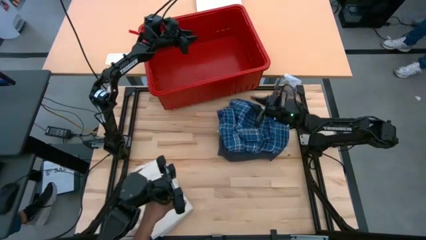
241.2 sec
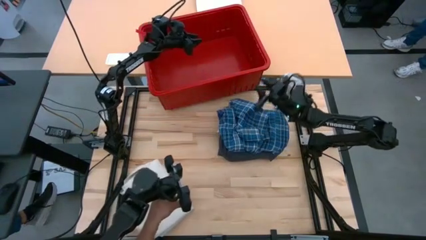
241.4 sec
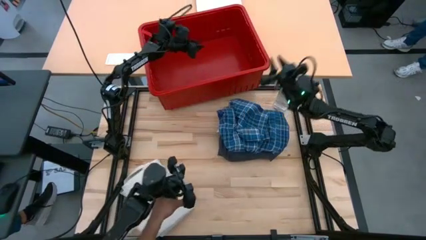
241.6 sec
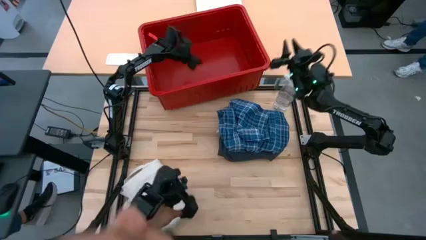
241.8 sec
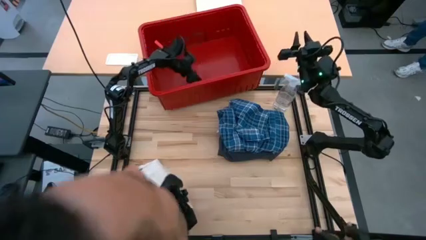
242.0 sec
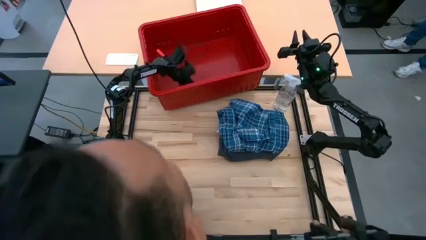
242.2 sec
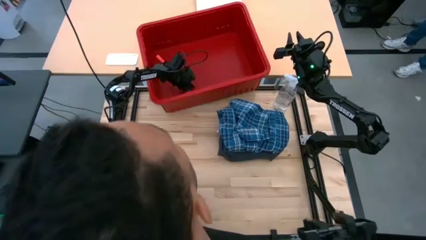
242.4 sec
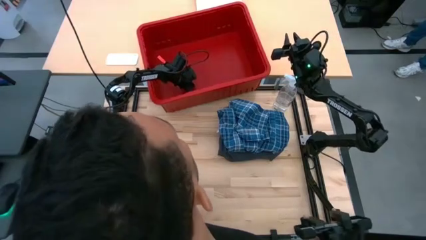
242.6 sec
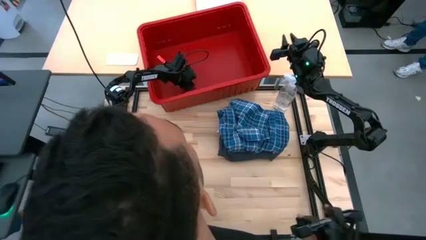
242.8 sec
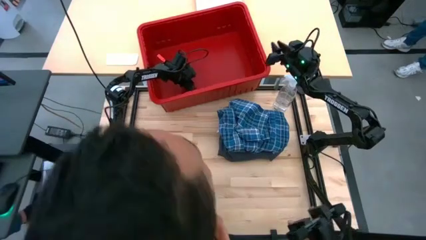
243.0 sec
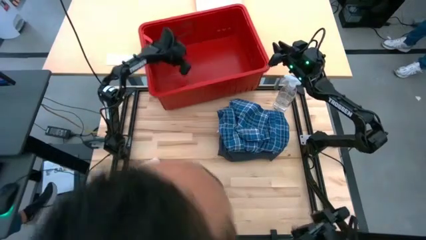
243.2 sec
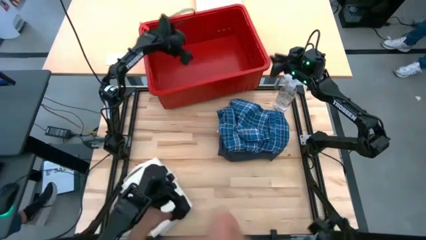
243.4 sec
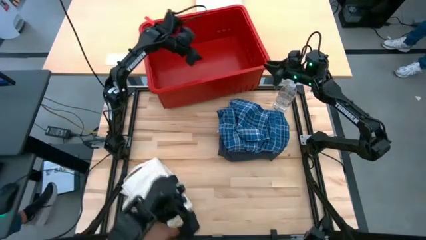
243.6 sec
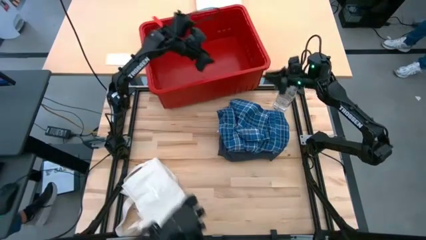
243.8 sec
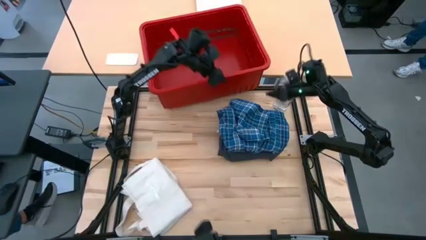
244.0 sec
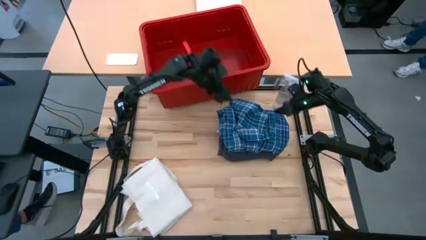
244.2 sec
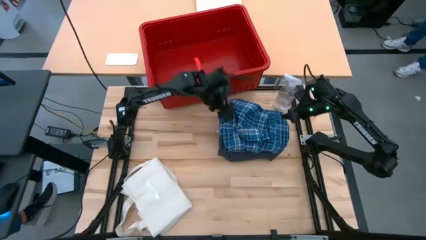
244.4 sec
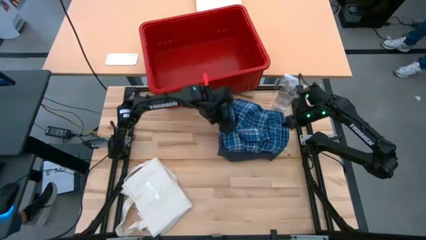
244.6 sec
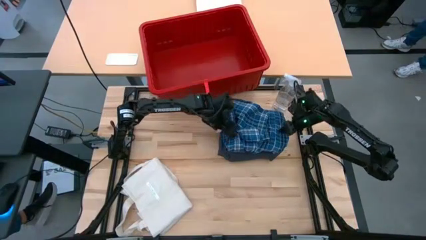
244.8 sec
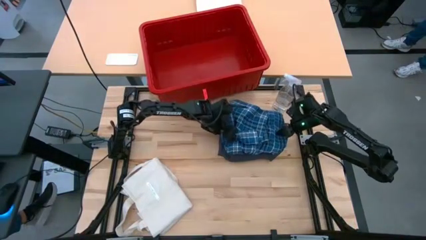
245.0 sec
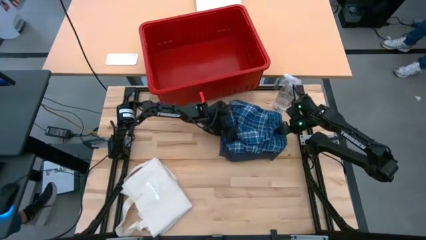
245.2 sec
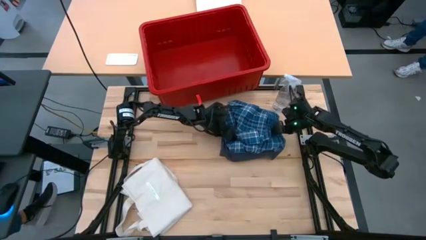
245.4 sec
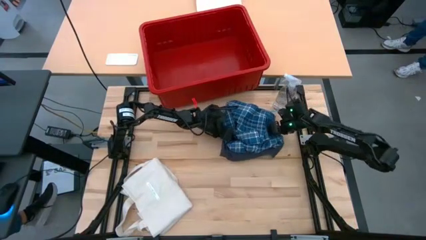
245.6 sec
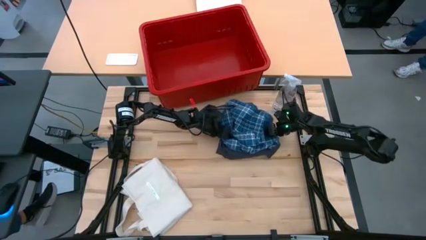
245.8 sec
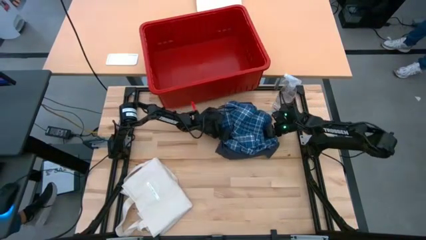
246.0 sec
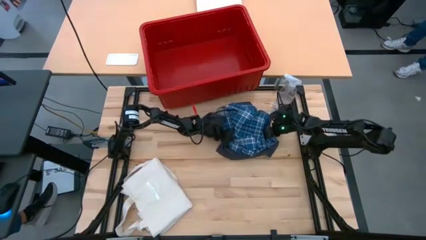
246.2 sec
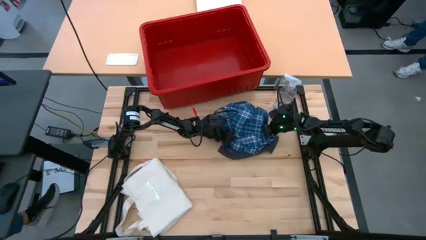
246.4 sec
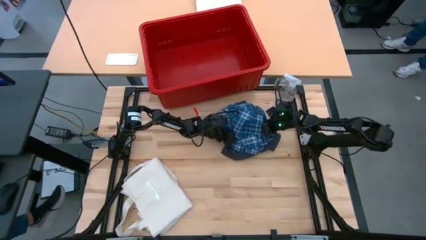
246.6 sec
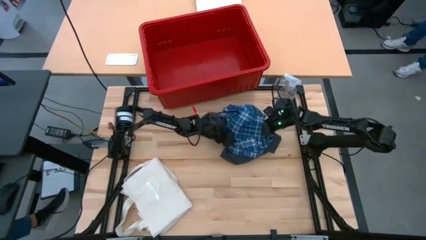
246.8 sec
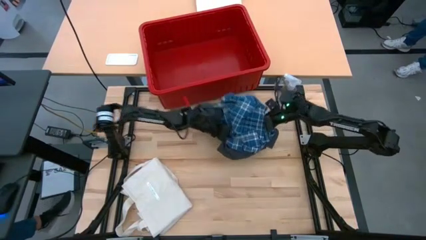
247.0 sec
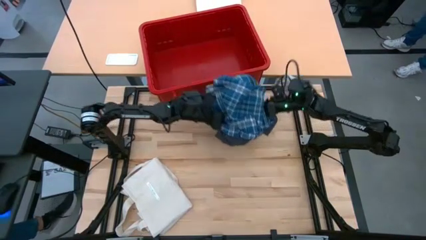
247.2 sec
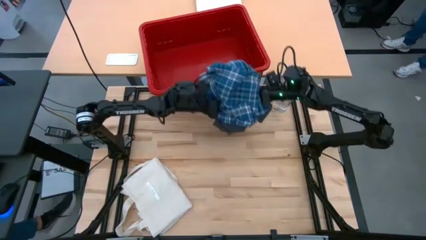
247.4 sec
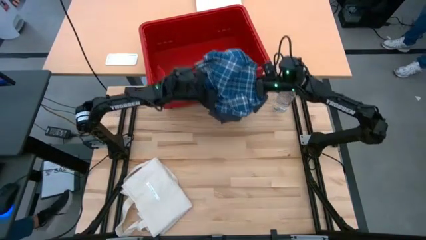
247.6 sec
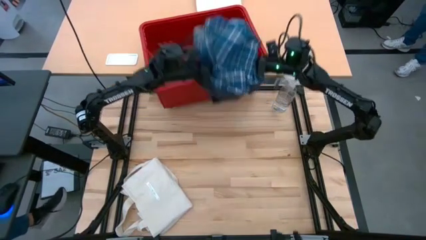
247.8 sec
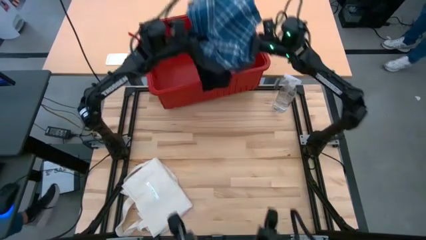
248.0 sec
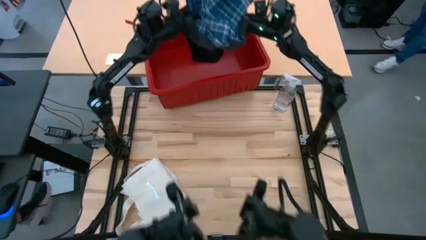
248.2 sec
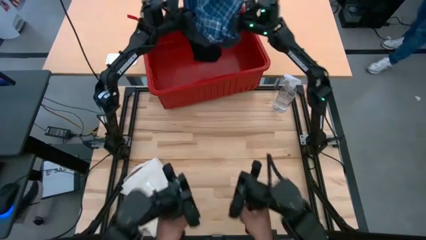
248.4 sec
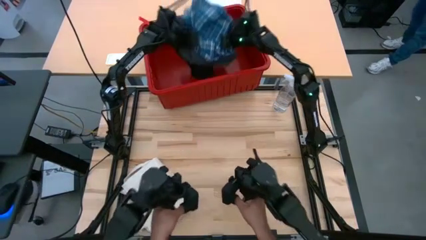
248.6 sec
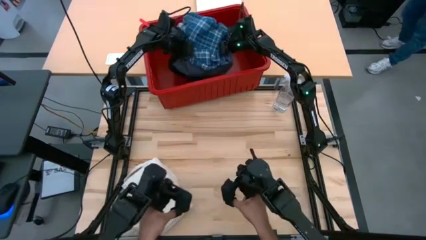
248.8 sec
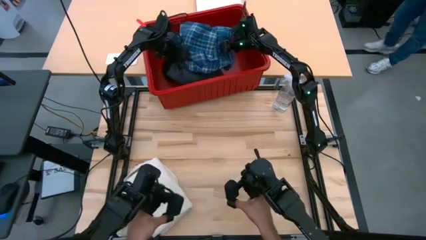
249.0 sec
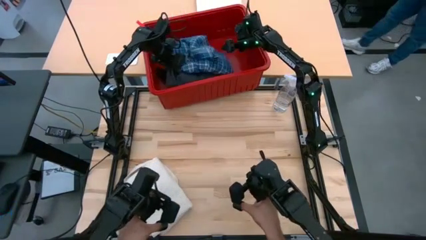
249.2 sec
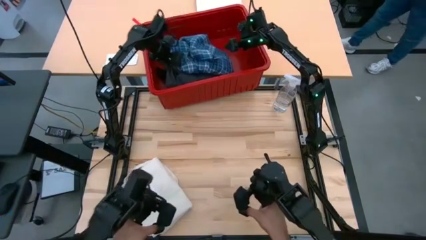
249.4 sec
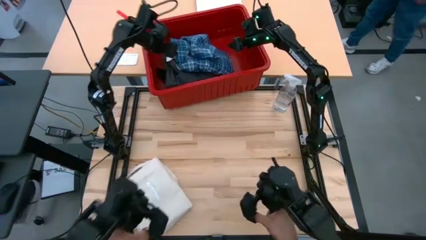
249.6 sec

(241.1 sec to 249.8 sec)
Task: Fold Laundry from Bin
Put the folded stacked clothes into the red laundry bin

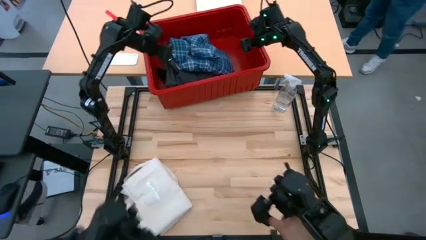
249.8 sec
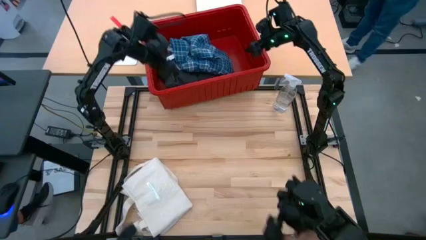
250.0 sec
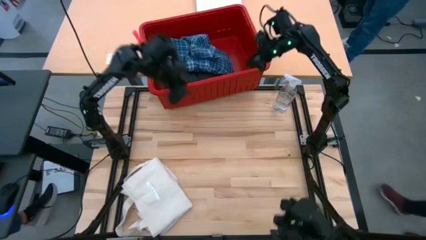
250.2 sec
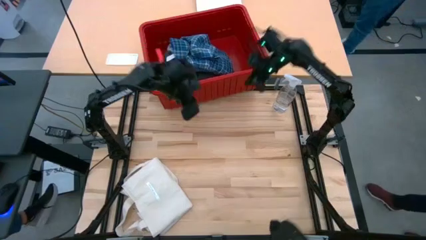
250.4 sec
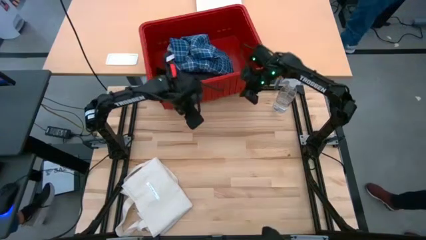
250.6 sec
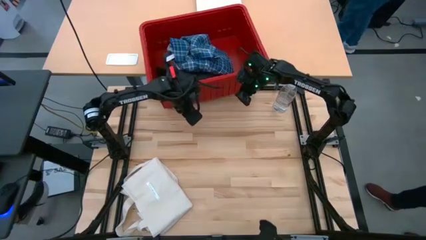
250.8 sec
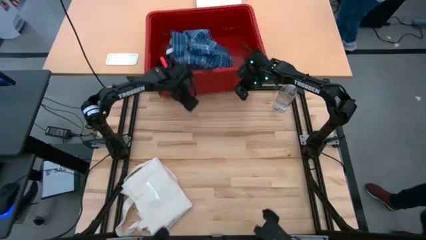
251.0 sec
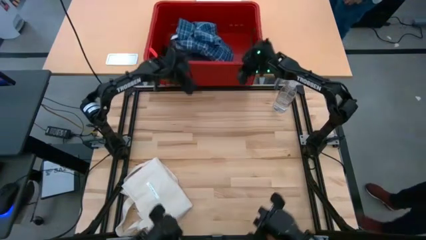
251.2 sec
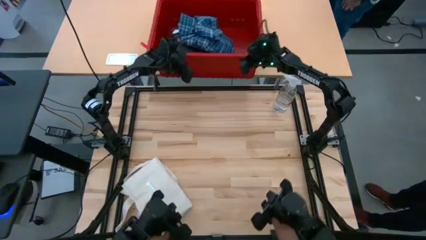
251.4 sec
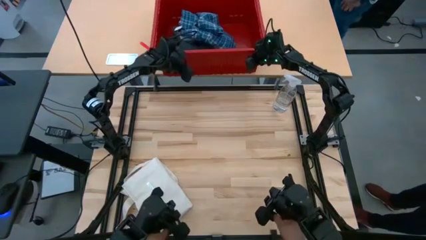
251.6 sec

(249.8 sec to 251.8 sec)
Adjust the red laundry bin on top of the other table

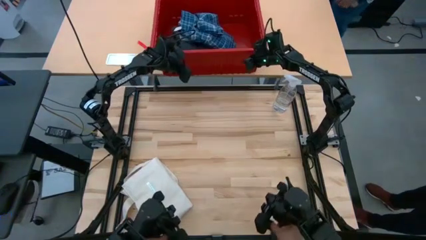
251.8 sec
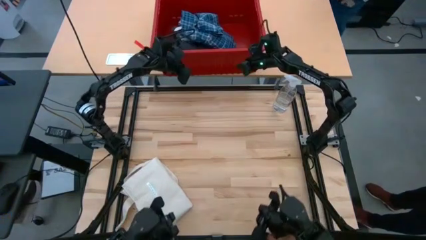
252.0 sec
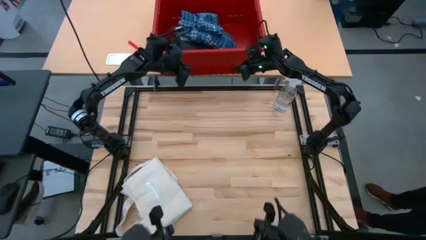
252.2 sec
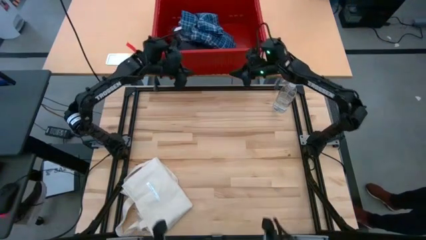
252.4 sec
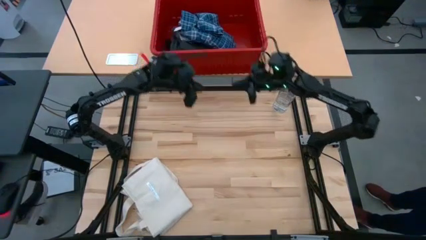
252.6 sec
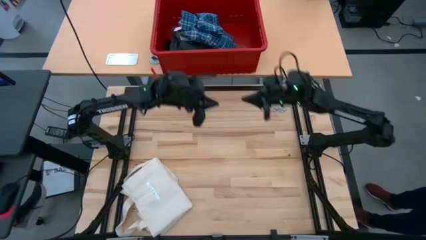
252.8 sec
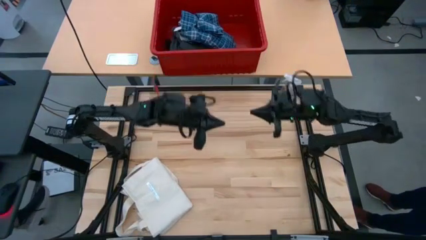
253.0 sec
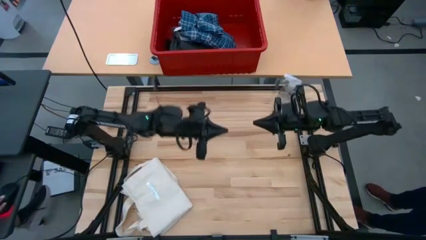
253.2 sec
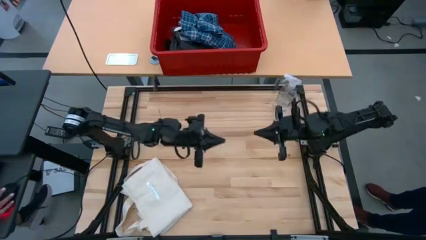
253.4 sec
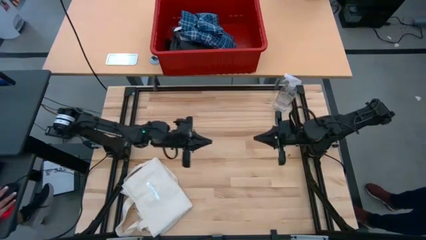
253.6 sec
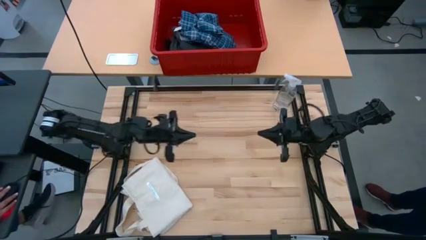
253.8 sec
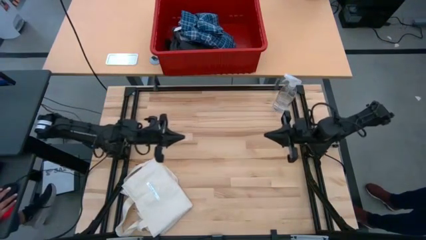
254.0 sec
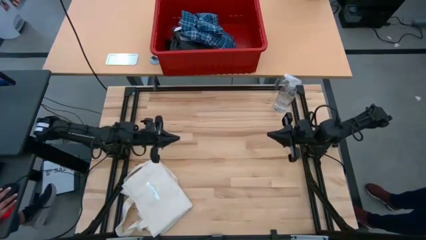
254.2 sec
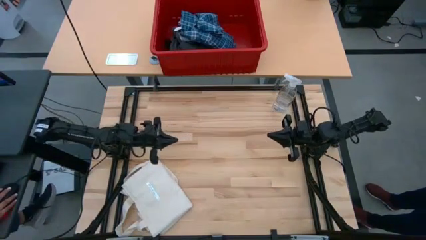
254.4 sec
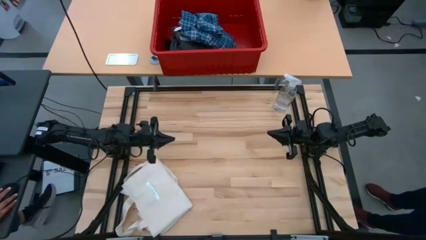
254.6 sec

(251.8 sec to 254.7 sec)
Return to Home Position

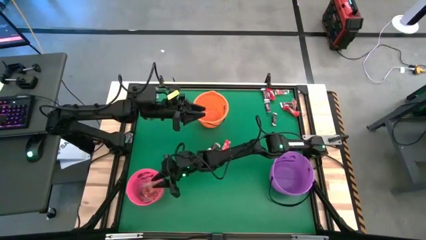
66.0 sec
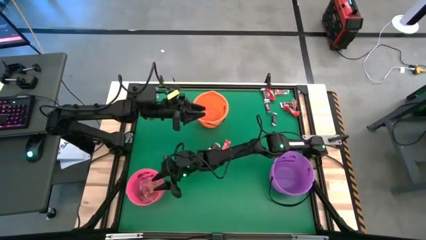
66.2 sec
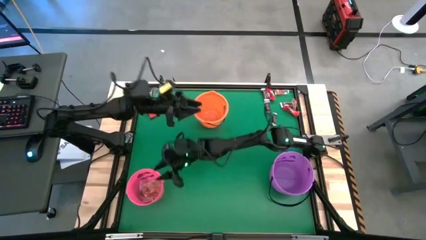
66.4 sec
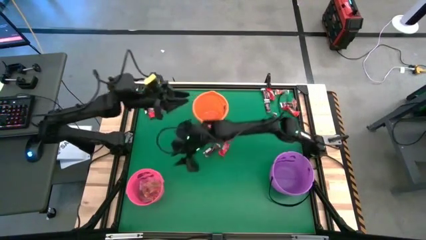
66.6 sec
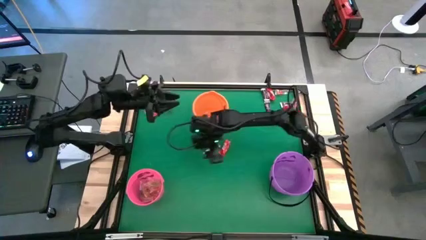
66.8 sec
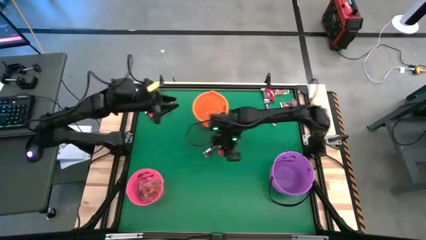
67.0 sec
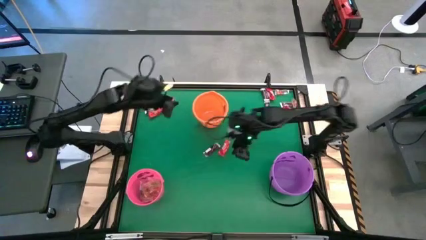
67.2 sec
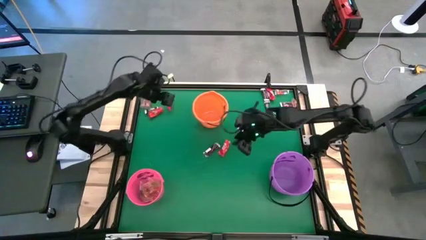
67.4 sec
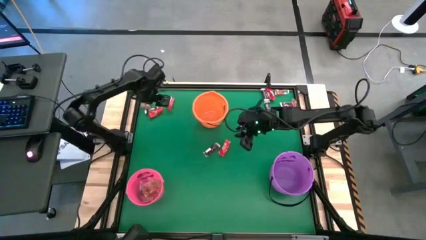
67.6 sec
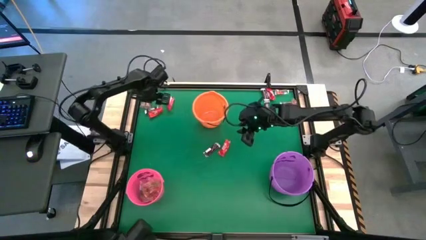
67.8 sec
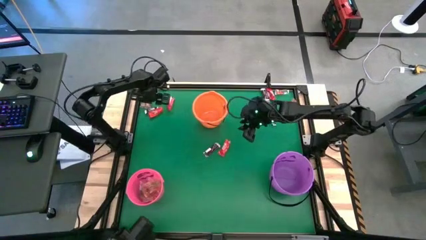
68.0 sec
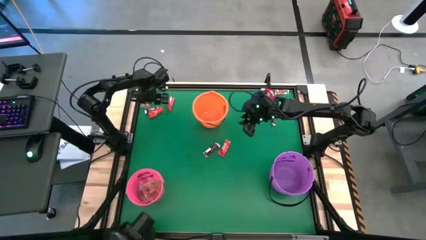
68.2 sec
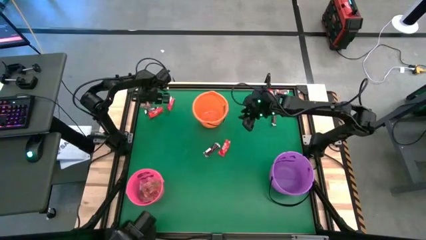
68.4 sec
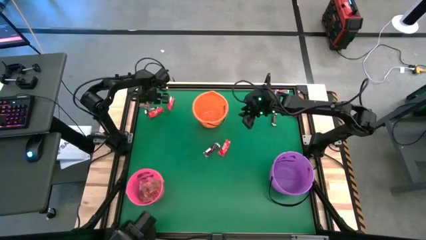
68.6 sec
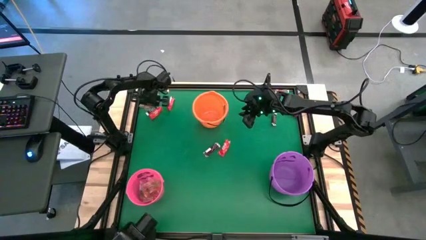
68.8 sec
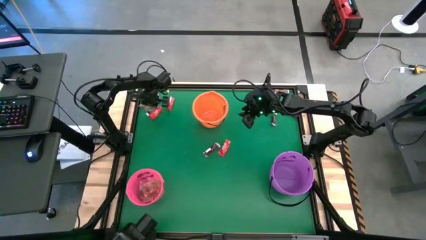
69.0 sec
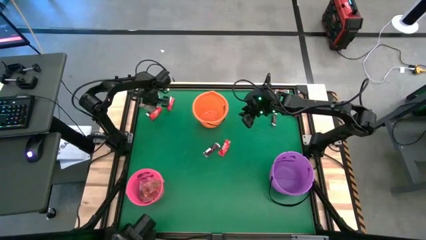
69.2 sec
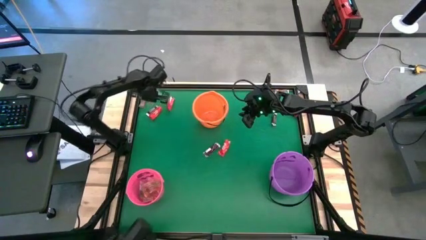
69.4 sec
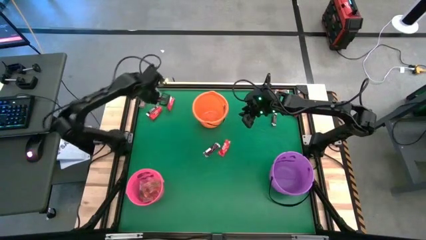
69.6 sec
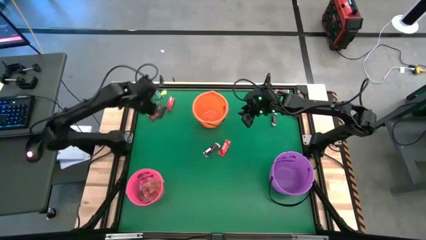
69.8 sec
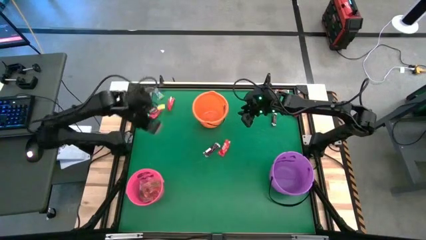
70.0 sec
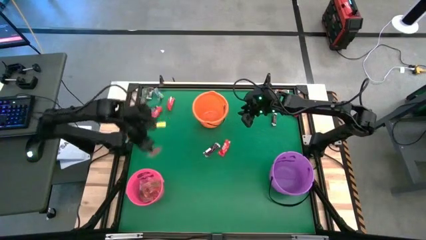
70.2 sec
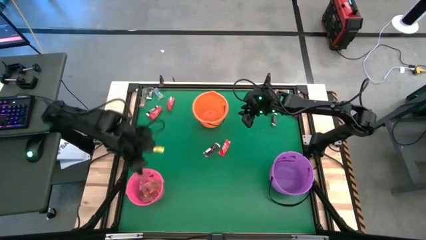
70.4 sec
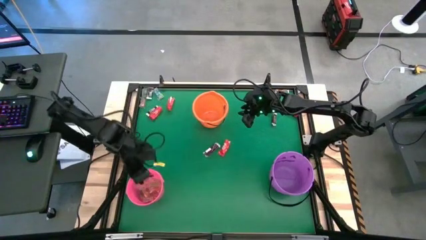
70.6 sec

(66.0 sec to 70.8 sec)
Task: Sort candy by brand, put in halloween buckets
Put the red gummy into the pink bucket
